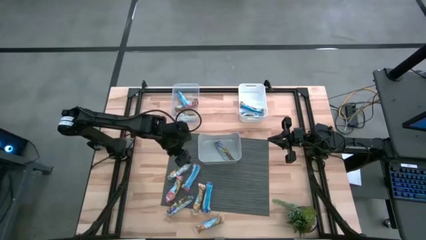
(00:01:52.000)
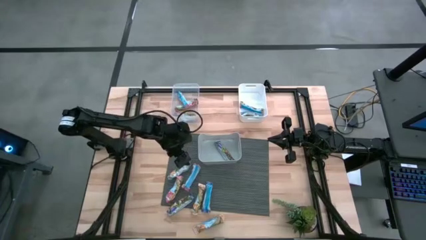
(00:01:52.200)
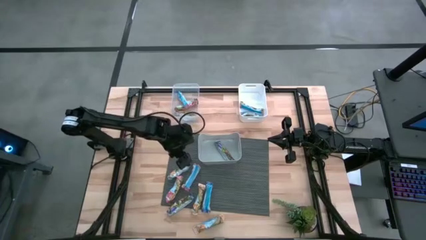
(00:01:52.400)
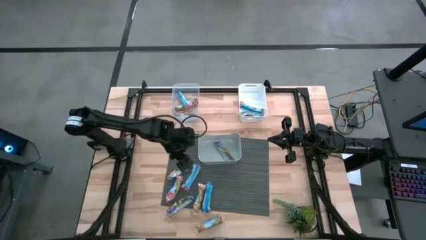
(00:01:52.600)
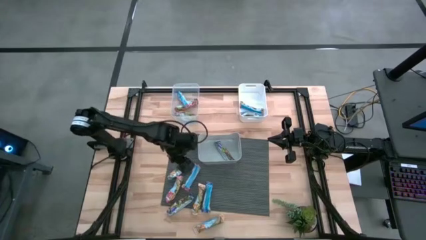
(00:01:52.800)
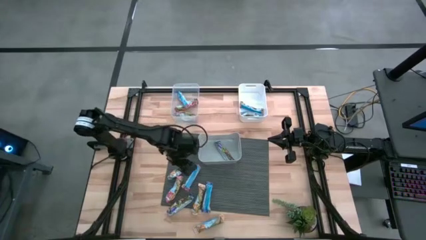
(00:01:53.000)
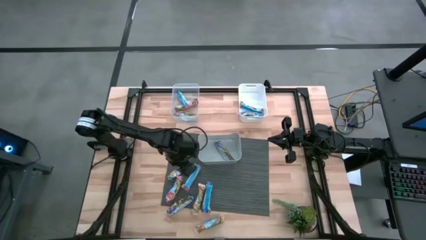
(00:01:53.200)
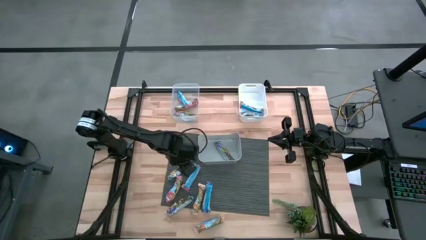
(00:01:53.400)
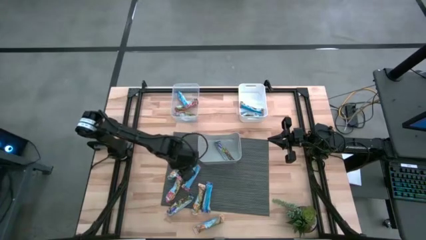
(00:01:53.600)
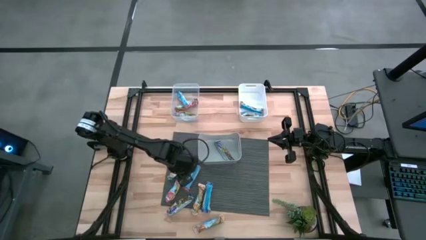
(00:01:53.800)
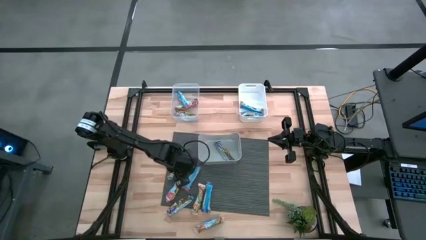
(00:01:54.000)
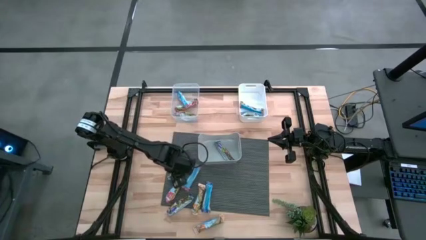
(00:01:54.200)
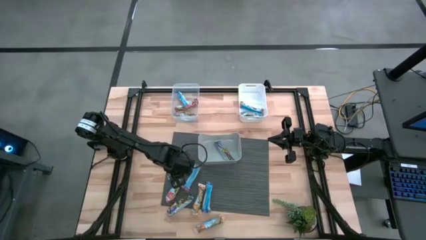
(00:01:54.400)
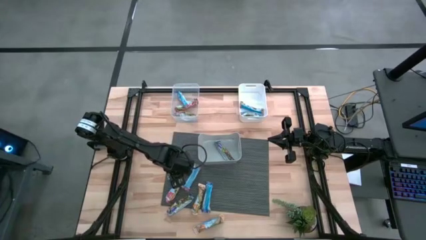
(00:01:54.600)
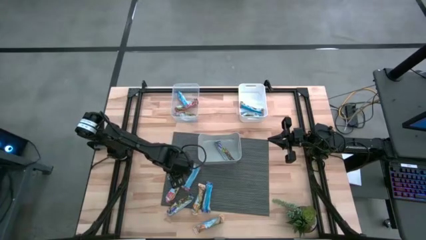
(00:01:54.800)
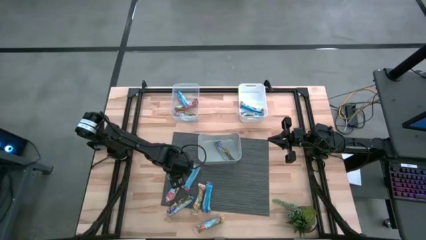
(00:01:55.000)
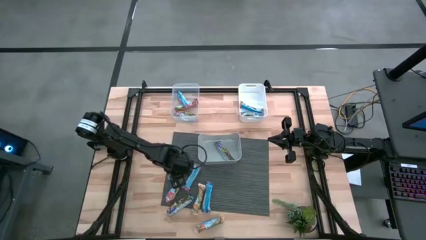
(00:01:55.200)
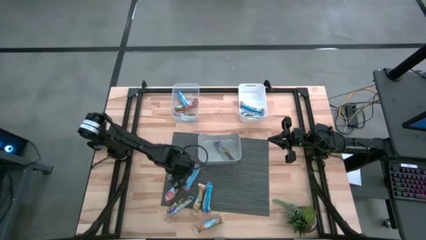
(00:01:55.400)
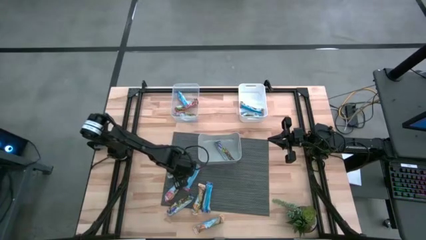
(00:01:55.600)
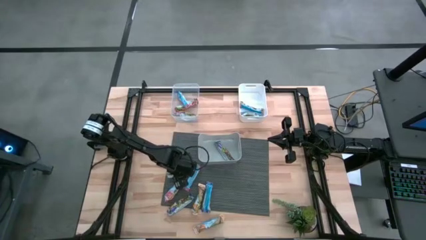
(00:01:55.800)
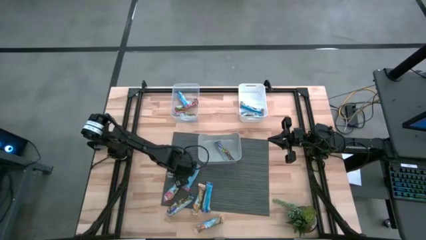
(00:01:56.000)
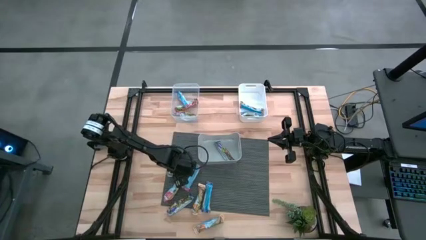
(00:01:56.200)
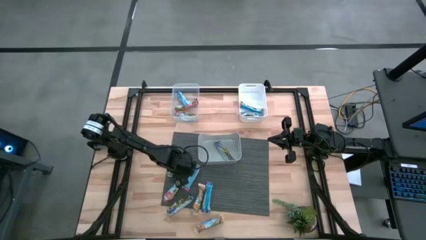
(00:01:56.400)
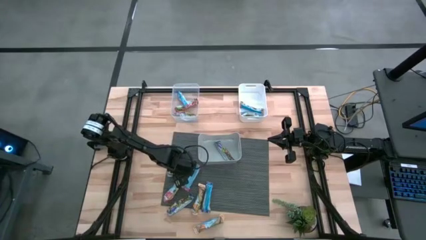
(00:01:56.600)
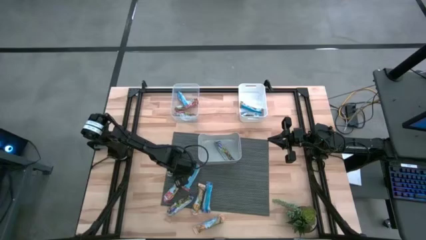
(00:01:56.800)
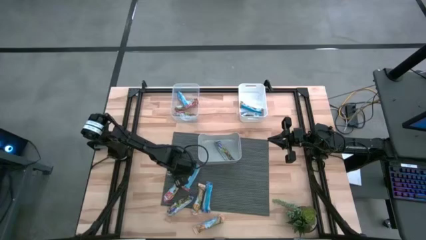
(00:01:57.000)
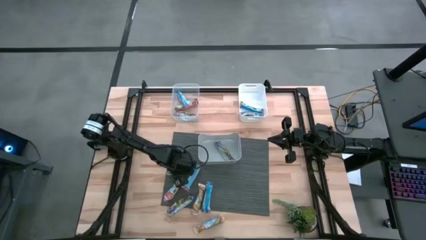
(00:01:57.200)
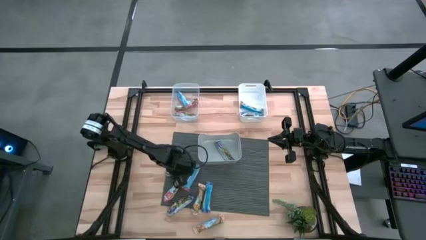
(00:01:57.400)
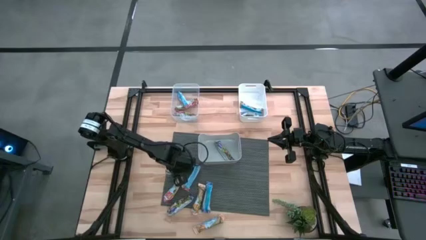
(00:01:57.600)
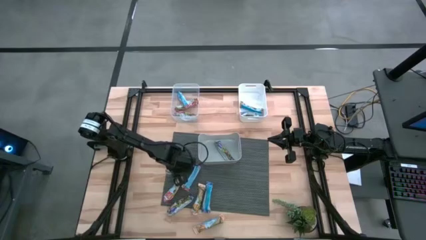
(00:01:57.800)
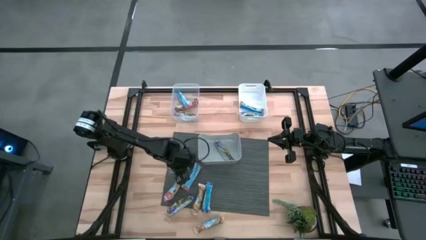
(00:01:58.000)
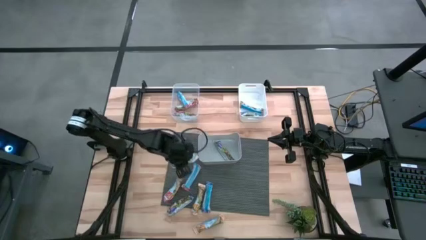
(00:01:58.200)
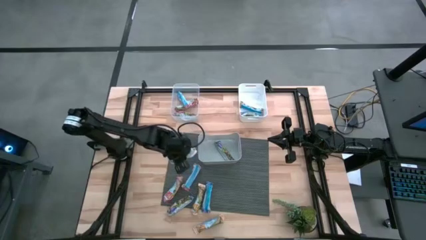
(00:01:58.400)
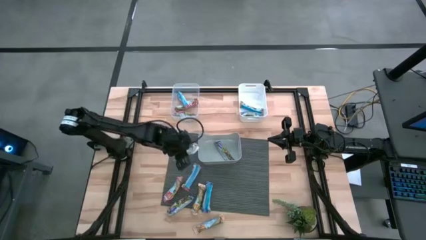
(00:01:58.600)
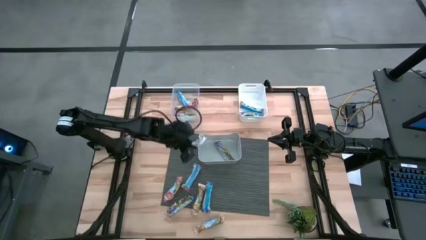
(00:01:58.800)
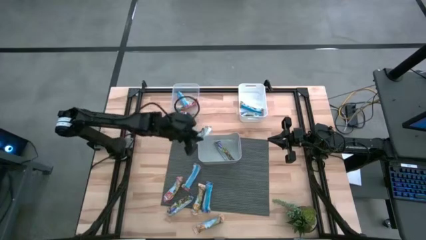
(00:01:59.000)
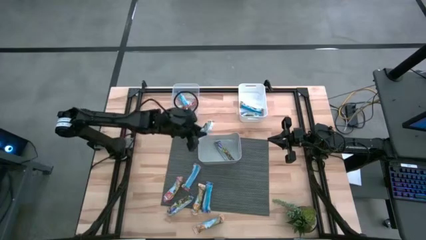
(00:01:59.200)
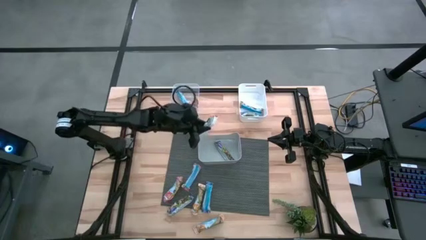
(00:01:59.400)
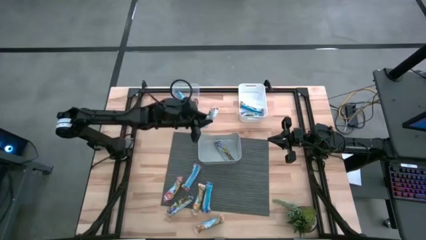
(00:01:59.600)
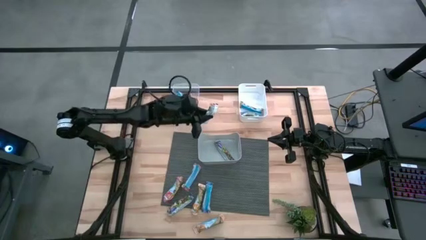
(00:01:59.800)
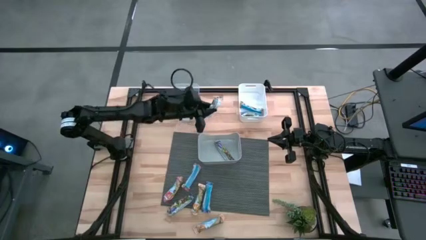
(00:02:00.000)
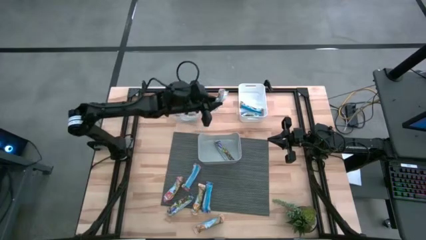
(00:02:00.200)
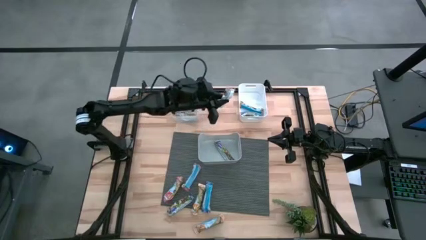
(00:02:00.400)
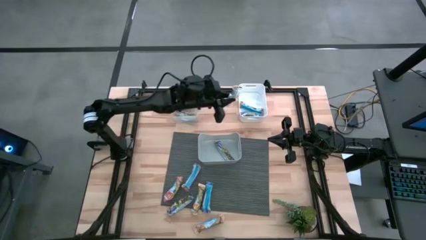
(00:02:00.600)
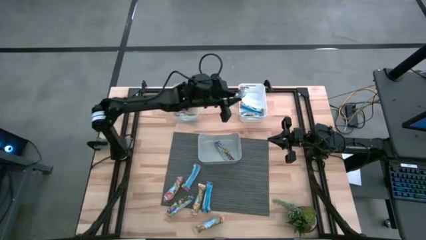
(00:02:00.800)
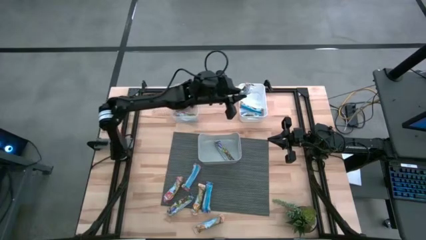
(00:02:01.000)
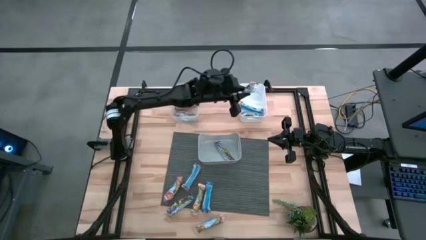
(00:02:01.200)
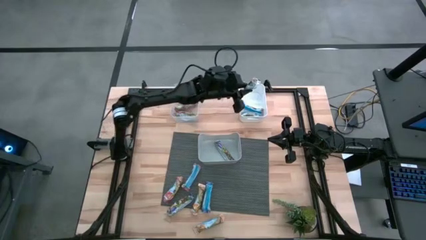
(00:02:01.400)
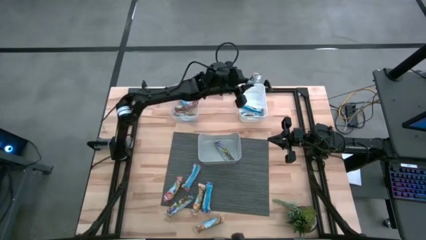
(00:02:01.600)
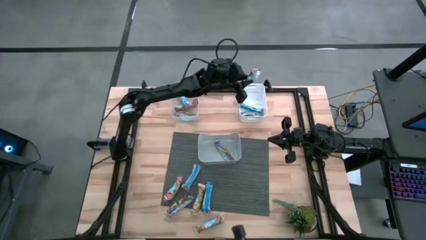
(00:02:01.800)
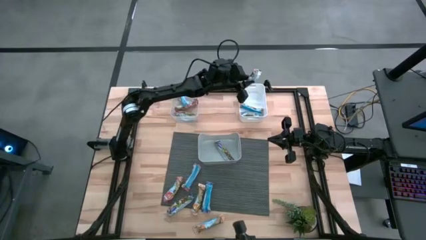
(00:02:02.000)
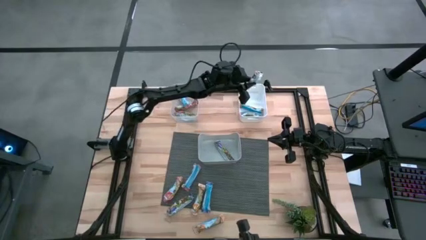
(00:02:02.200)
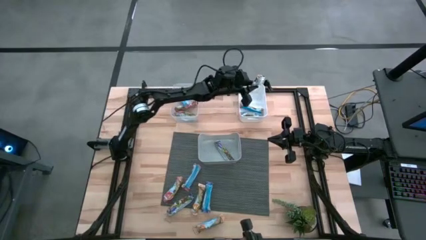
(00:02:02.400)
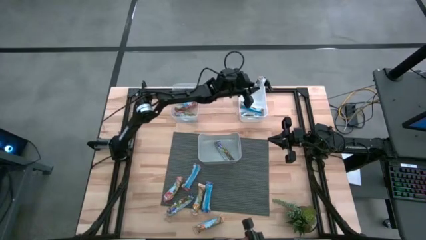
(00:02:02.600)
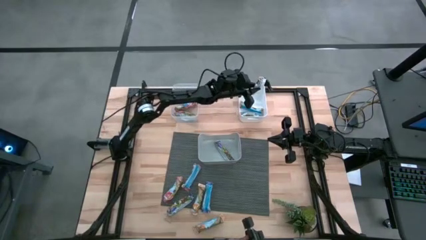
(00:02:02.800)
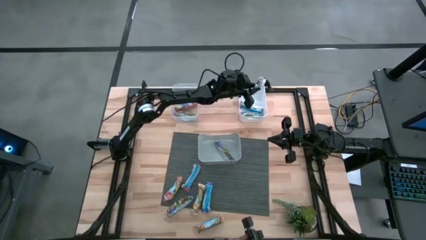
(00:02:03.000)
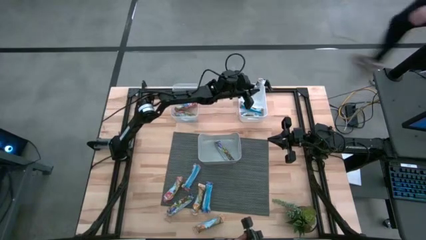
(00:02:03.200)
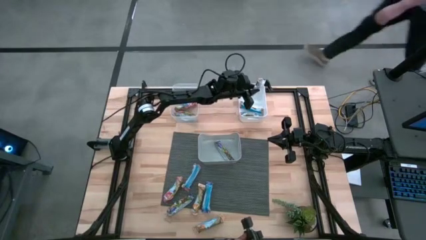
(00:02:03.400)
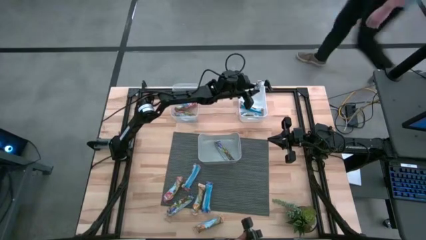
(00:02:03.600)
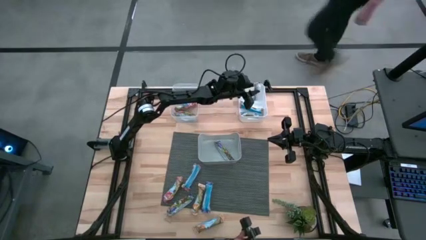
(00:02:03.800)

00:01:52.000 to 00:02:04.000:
Task: Pick and place Granola Bars by type
Put the yellow granola bar into the white bin

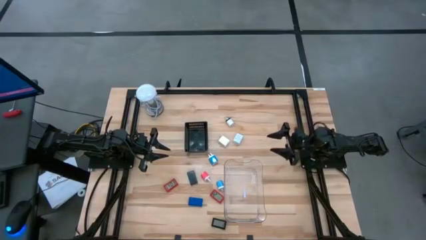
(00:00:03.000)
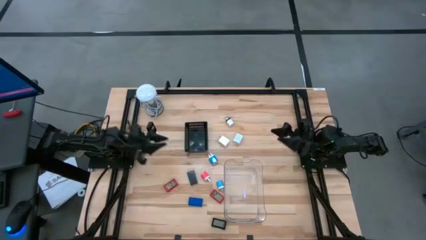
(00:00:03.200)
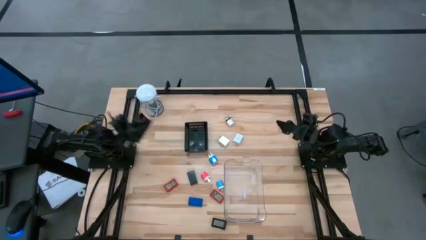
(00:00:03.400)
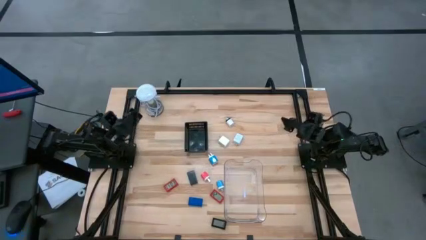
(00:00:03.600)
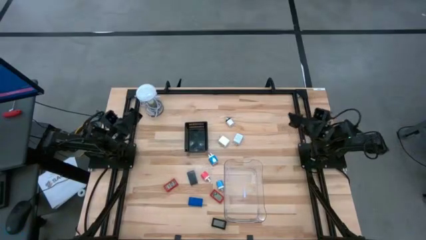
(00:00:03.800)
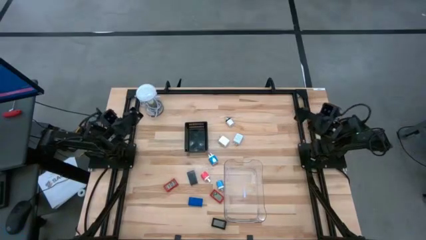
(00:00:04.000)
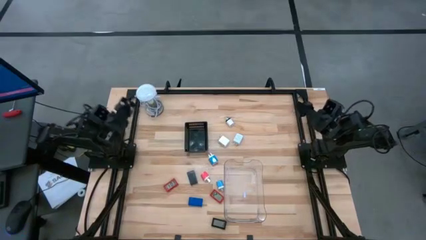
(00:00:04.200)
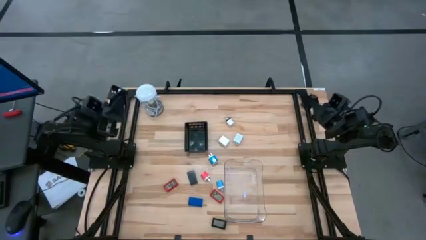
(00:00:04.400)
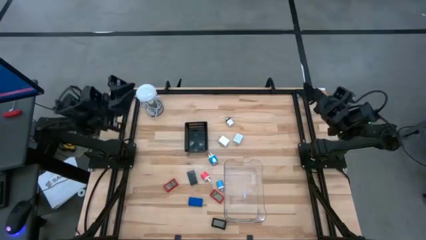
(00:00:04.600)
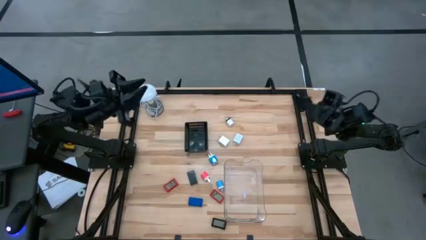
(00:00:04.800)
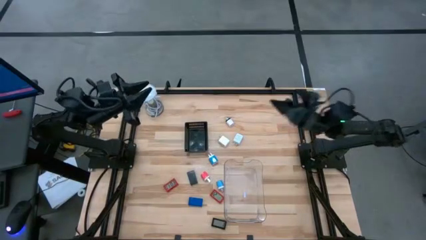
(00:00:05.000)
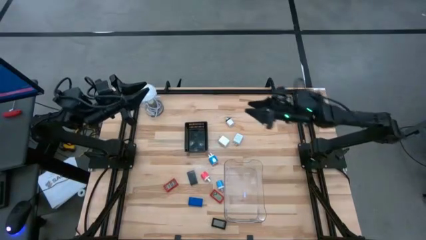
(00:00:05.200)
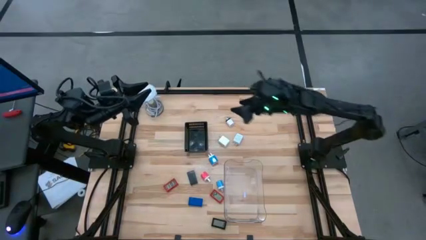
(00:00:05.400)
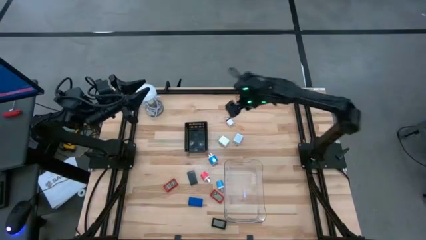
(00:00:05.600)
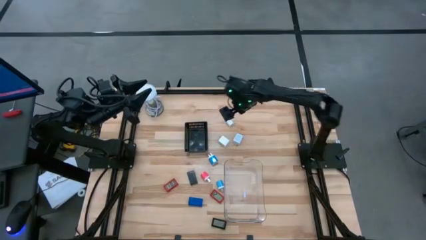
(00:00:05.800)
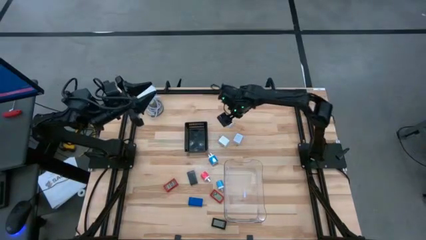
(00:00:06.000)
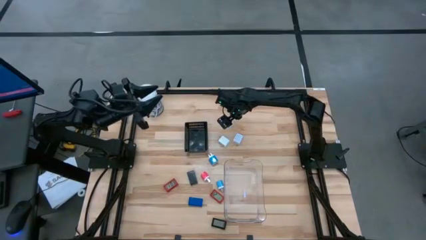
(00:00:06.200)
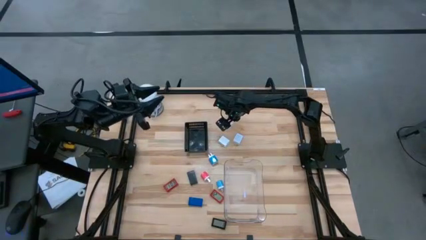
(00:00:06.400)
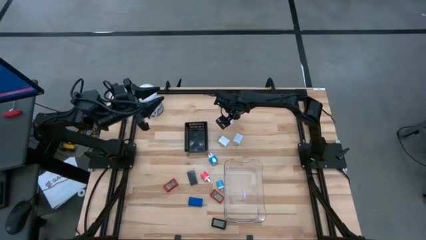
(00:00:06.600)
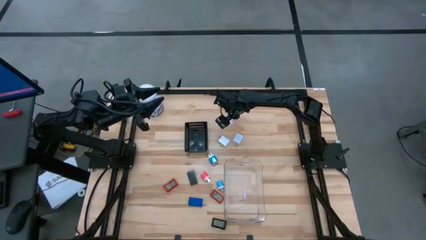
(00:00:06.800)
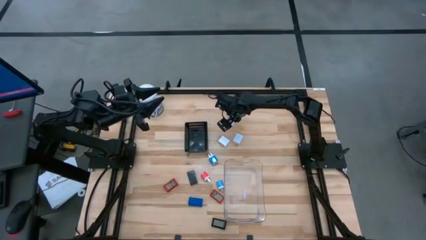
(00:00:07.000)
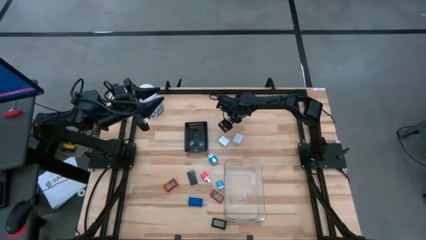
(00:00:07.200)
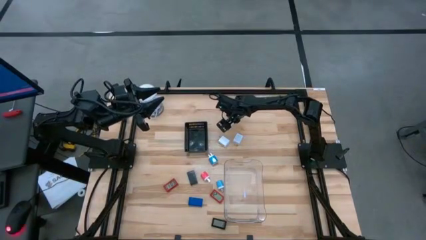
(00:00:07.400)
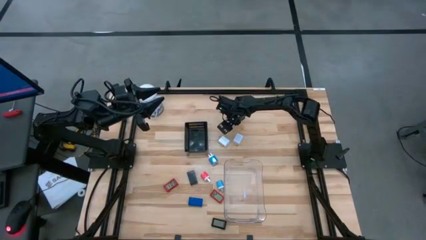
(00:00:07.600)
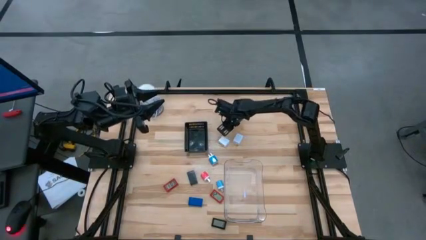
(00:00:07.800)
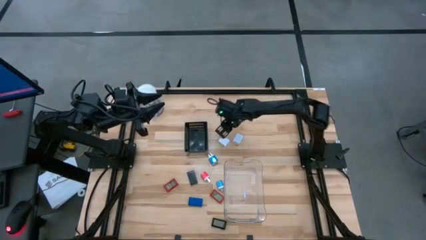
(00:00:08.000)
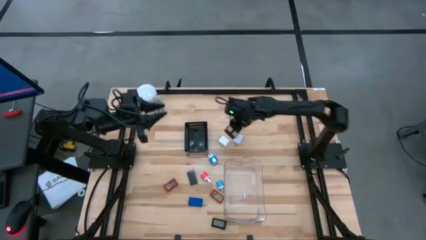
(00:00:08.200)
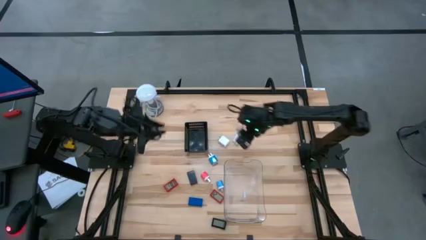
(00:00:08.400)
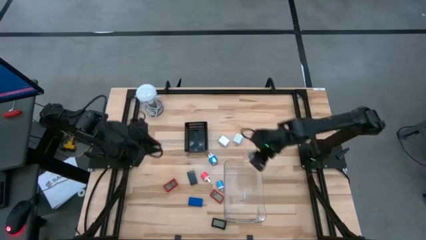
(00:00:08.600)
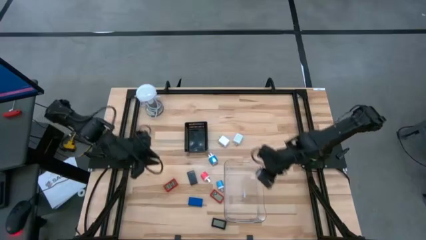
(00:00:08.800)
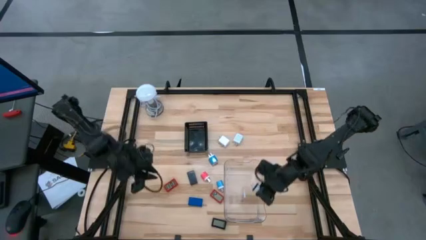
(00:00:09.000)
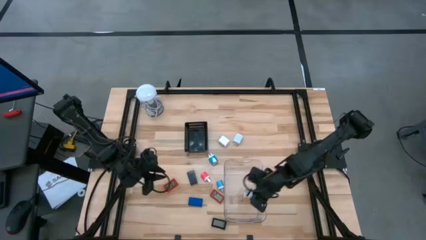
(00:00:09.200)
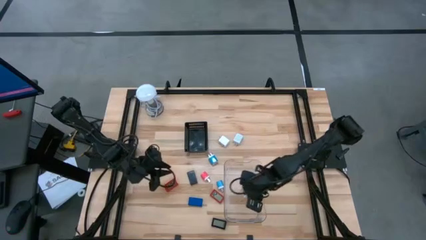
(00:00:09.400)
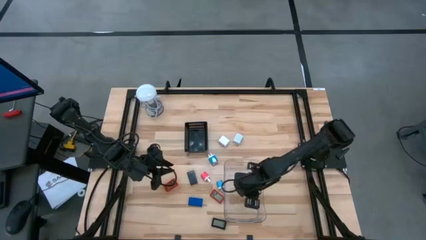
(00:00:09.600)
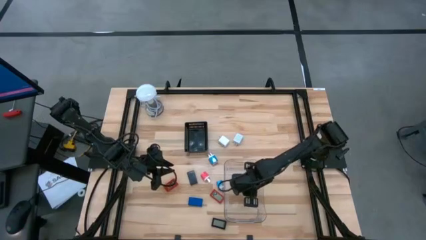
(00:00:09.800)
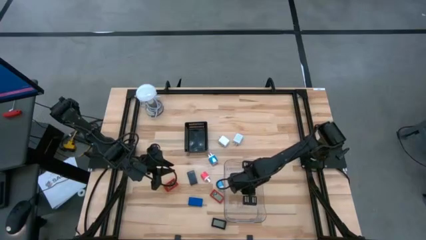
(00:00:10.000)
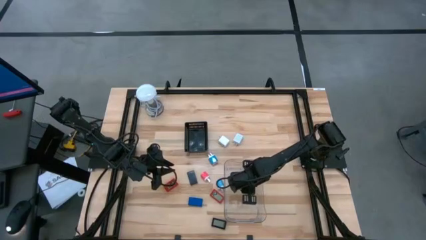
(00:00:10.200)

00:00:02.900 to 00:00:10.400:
Task: Pick & Place Office items
Put the white black charger adapter into the transparent bin
